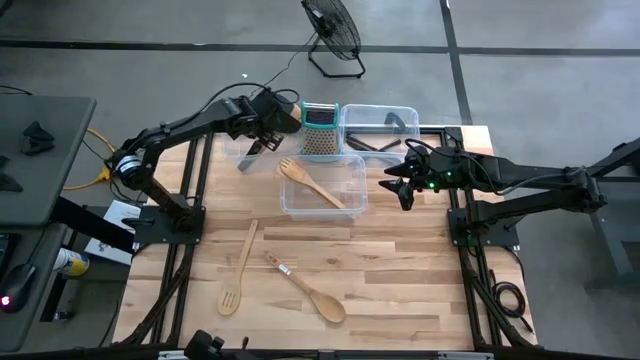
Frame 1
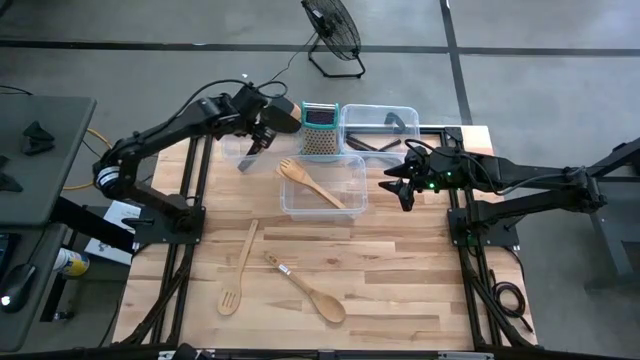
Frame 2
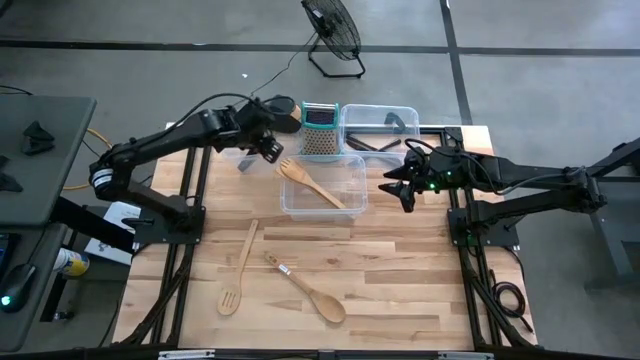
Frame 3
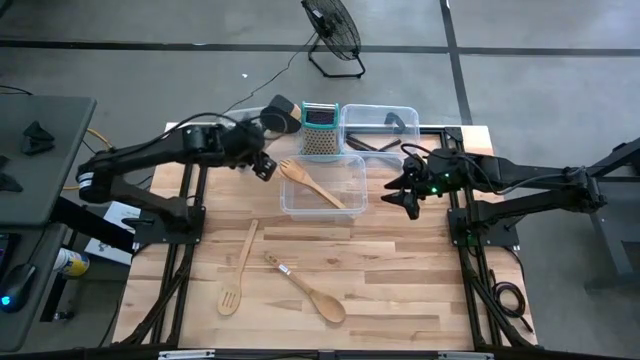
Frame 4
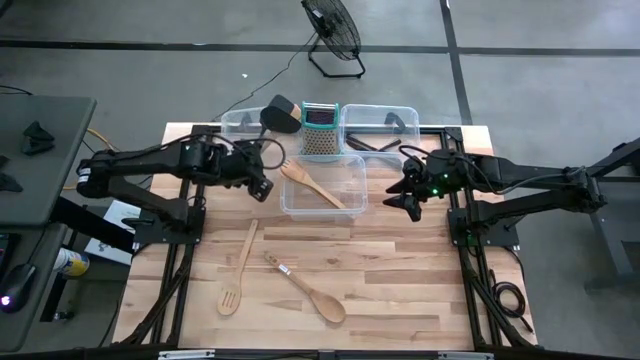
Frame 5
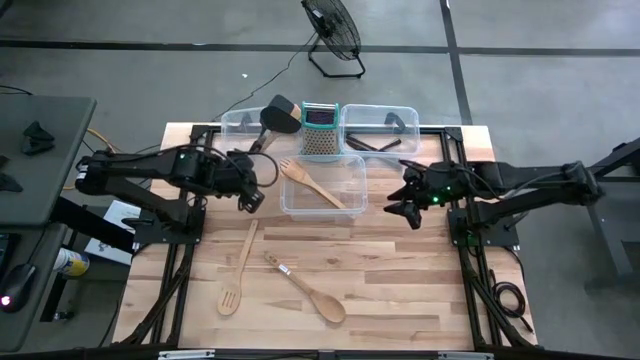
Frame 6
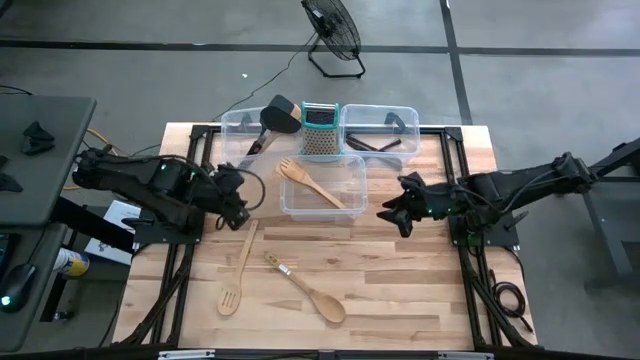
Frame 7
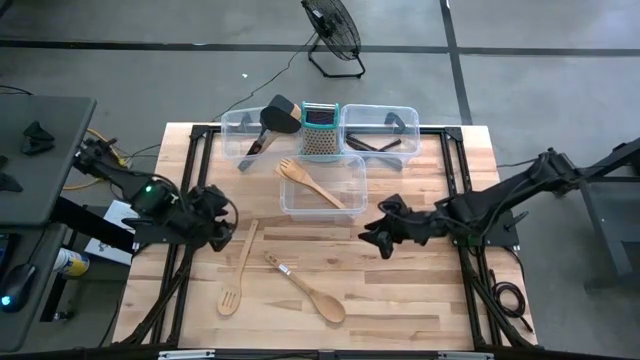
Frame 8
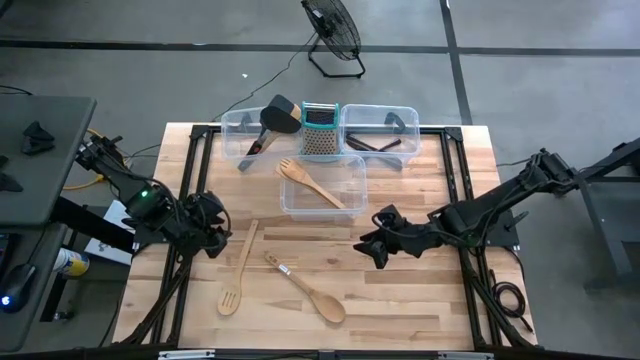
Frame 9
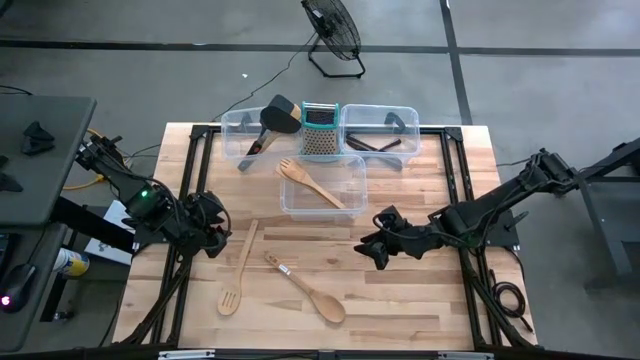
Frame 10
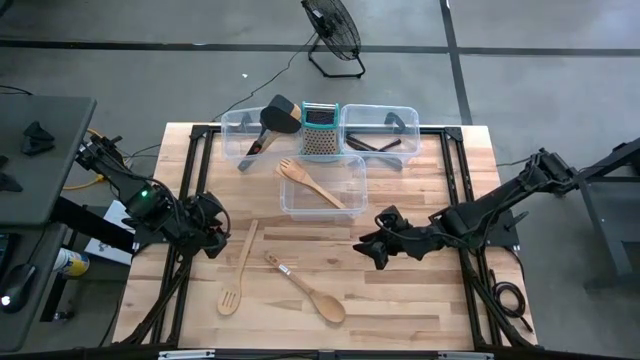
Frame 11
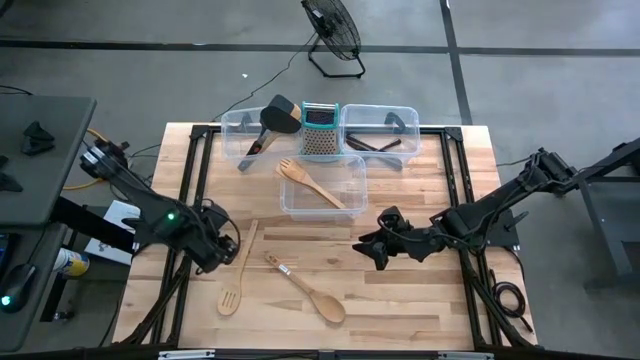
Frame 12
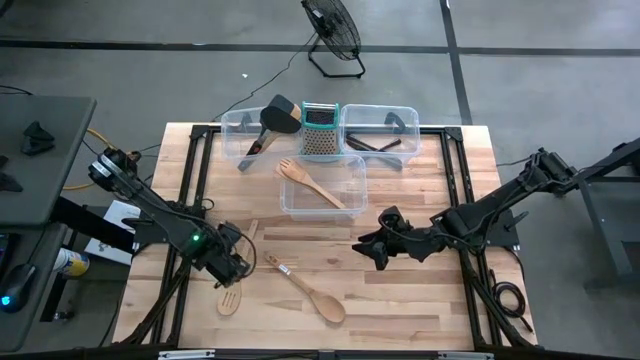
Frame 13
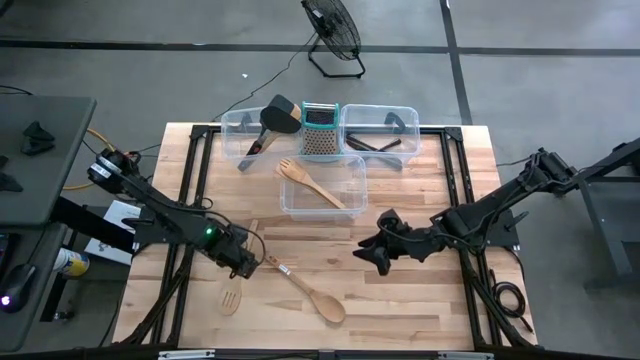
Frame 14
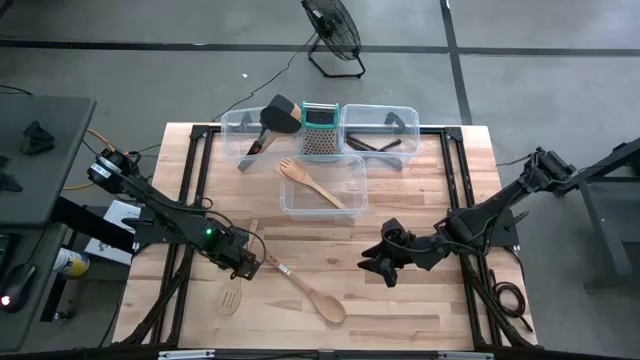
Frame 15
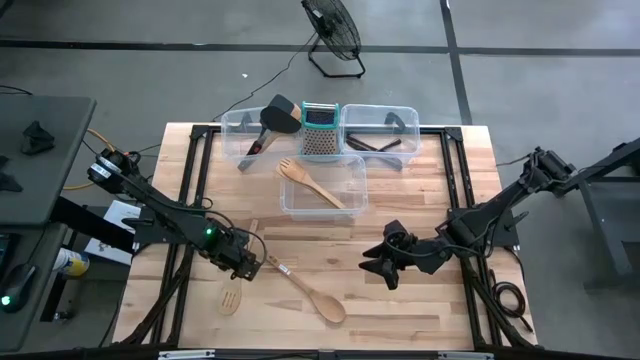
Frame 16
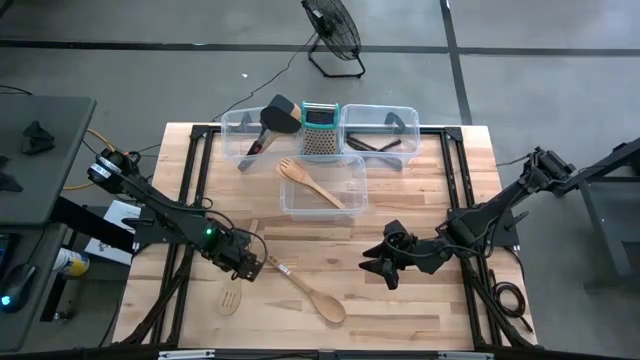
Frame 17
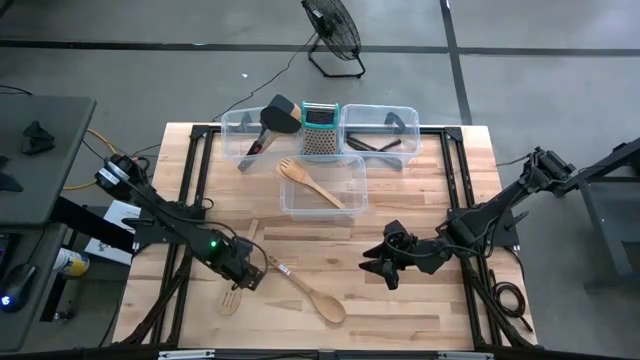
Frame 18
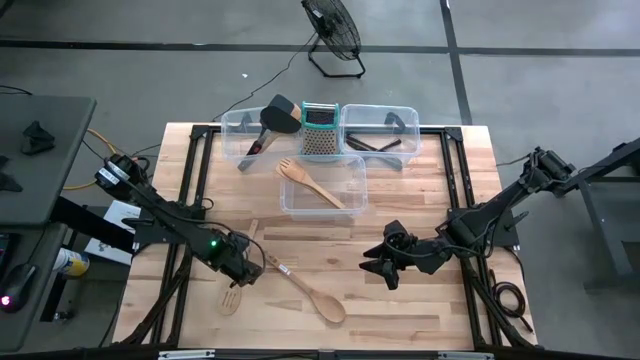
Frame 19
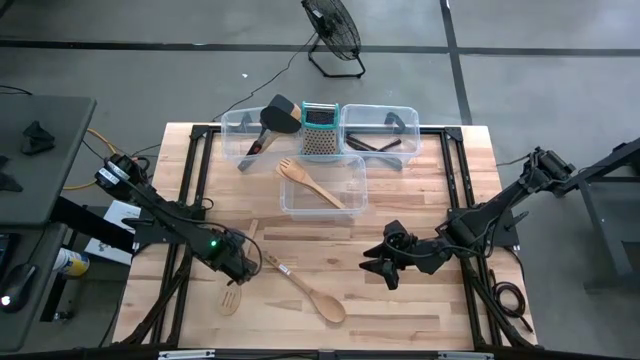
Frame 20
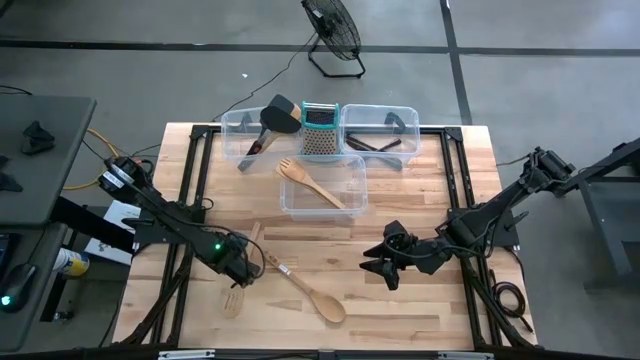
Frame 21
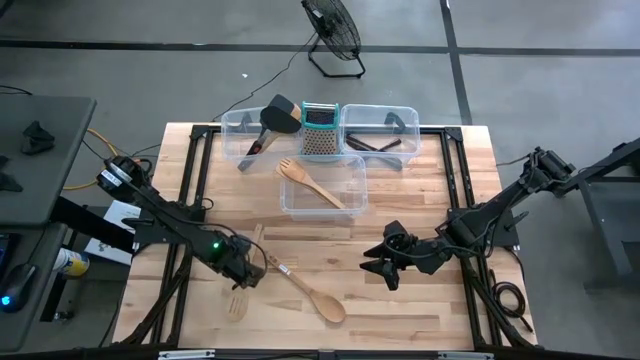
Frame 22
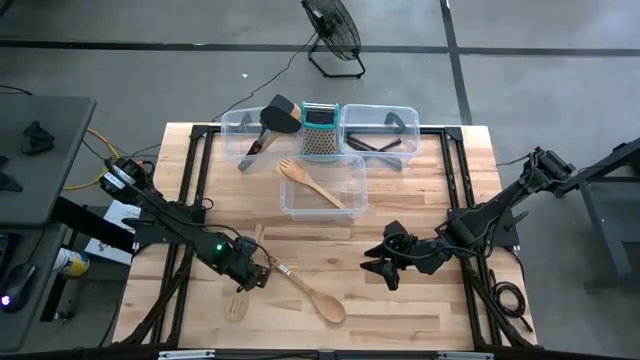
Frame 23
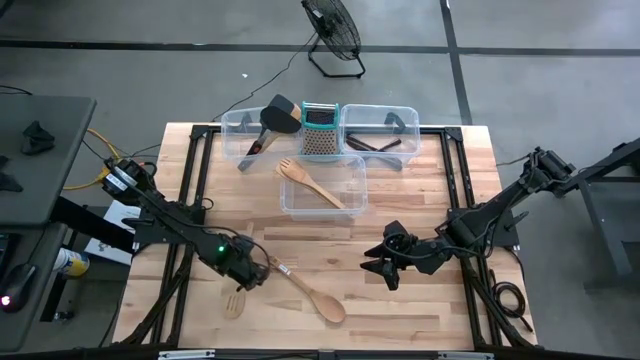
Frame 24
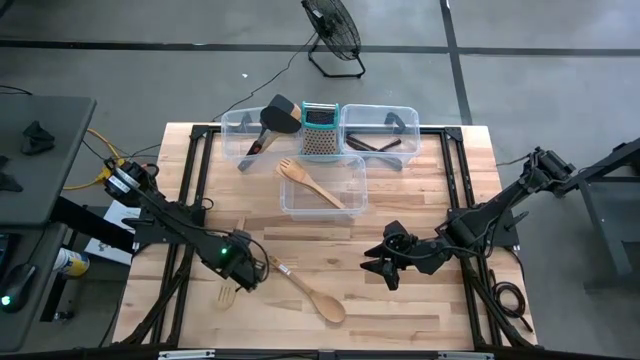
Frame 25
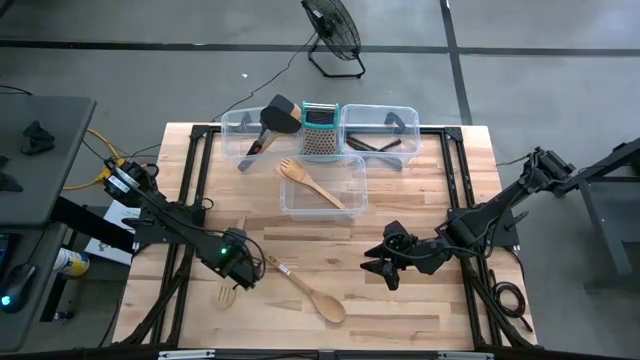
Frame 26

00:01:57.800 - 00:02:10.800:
Task: Pick & Place Kitchen Items
Put the light brown slotted spoon into the middle transparent bin

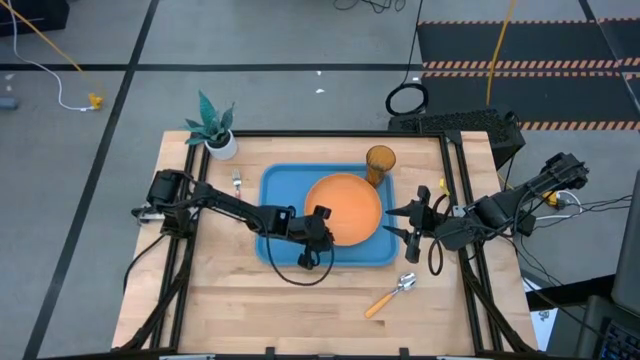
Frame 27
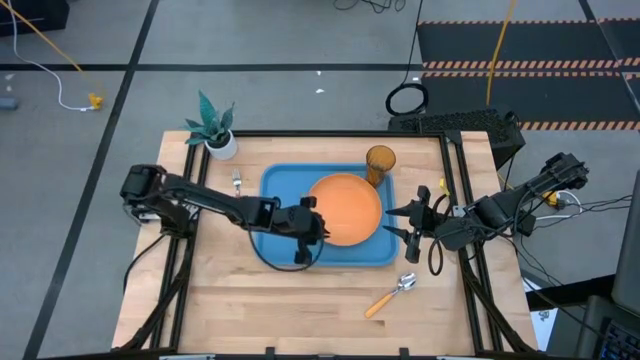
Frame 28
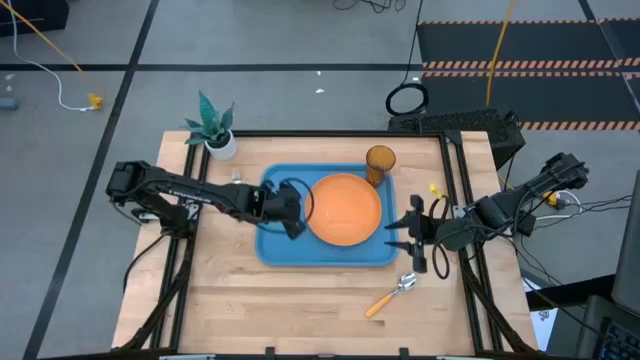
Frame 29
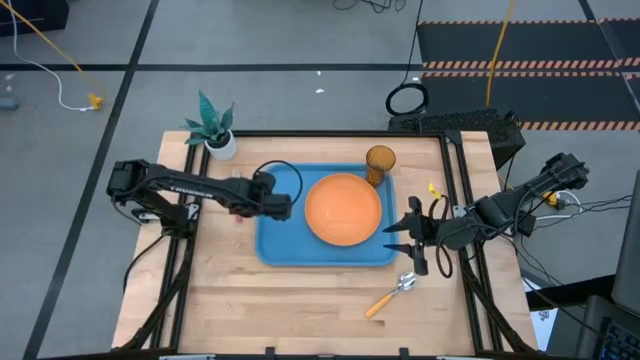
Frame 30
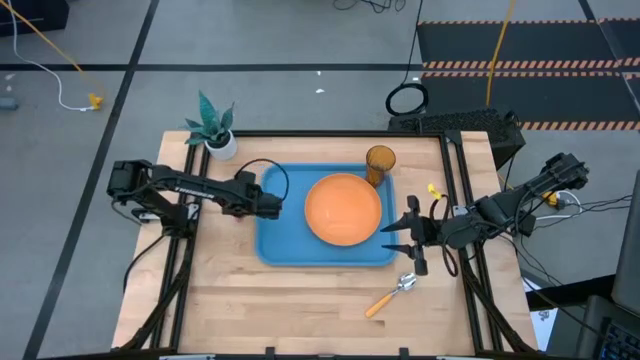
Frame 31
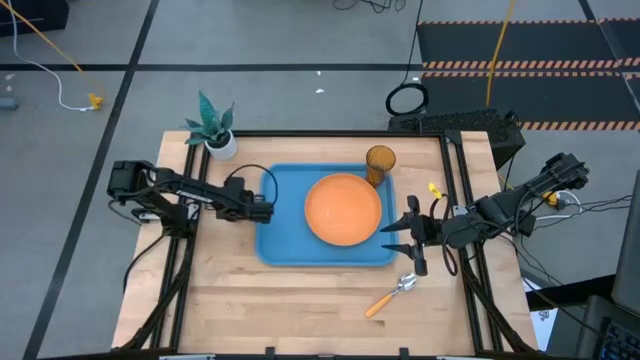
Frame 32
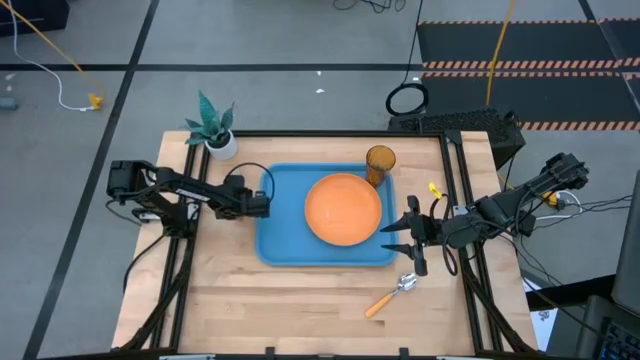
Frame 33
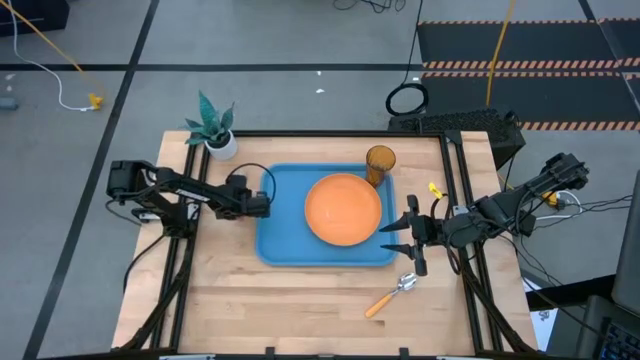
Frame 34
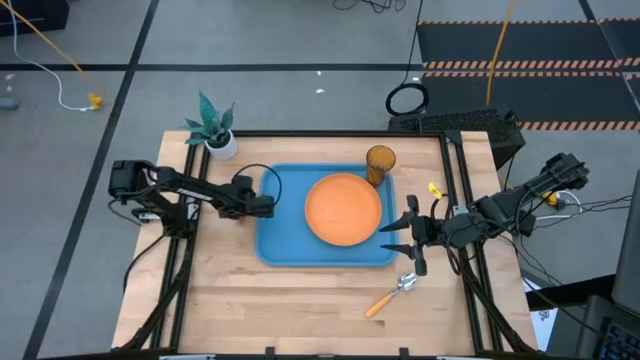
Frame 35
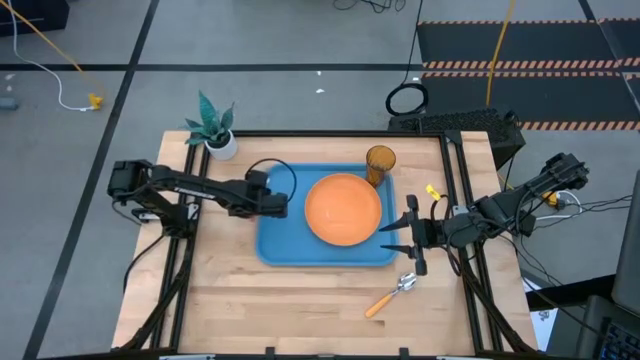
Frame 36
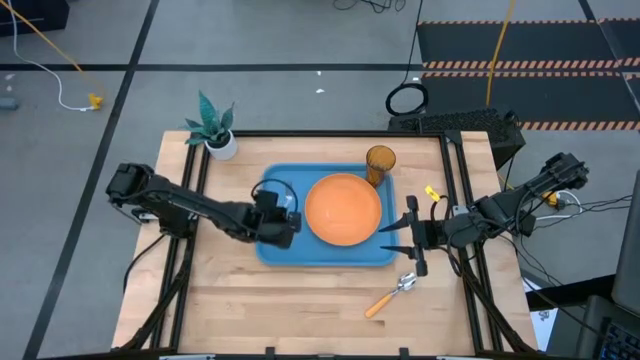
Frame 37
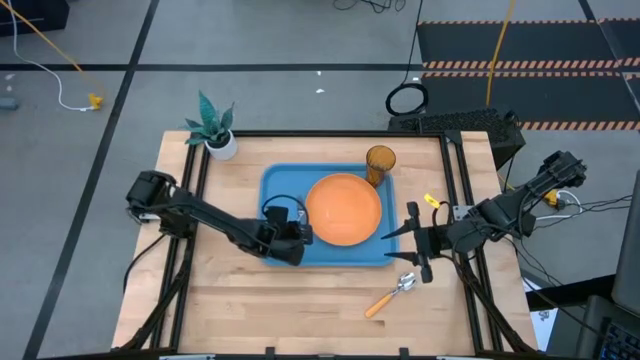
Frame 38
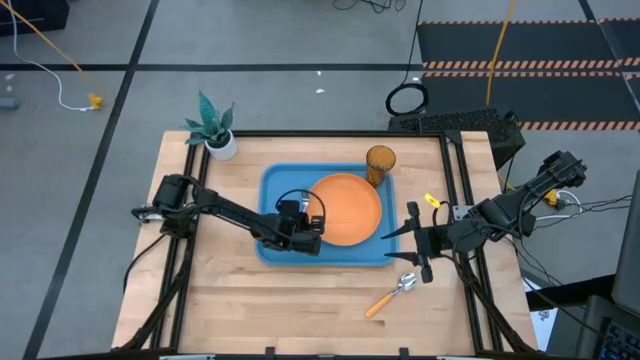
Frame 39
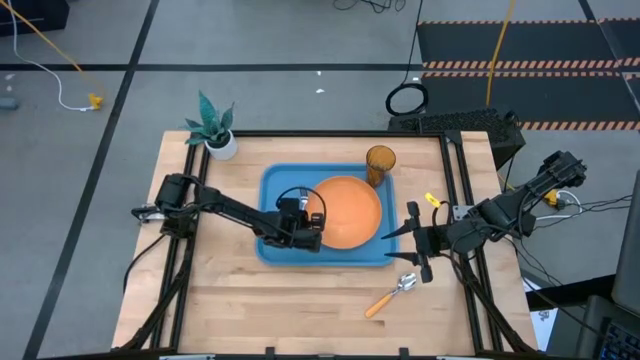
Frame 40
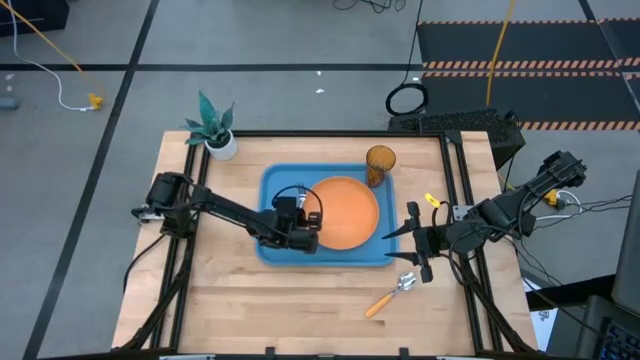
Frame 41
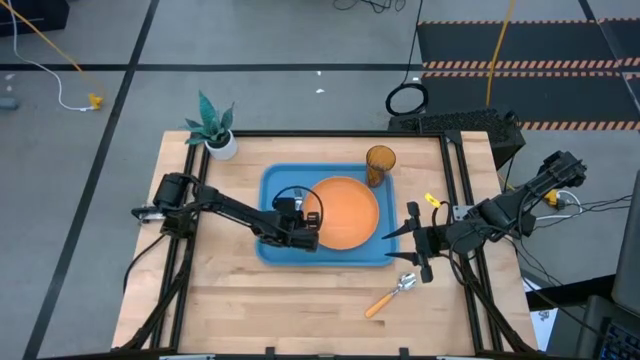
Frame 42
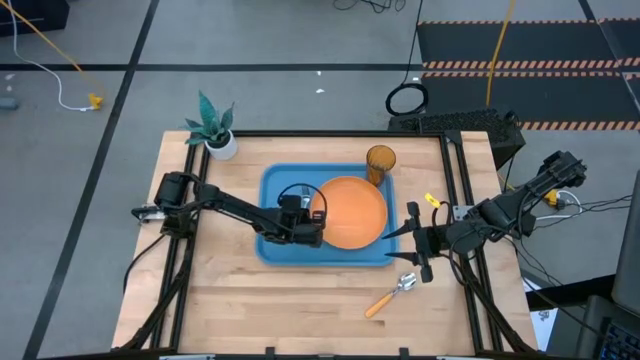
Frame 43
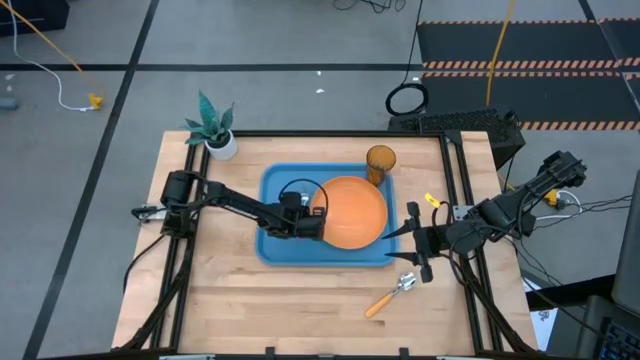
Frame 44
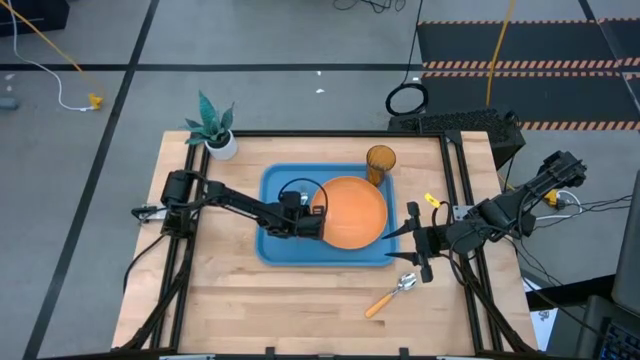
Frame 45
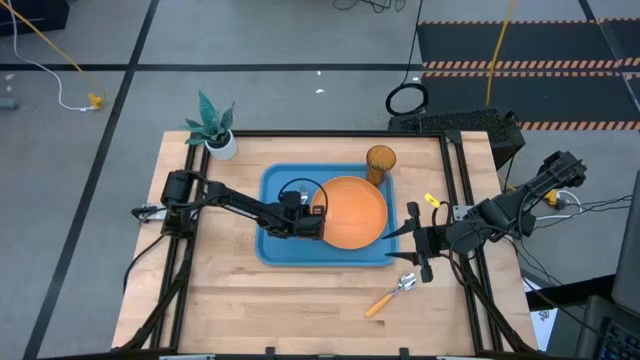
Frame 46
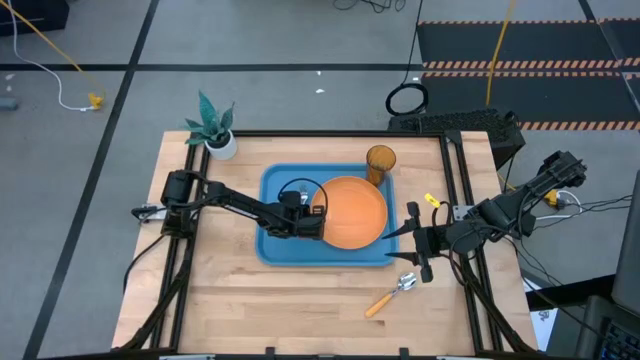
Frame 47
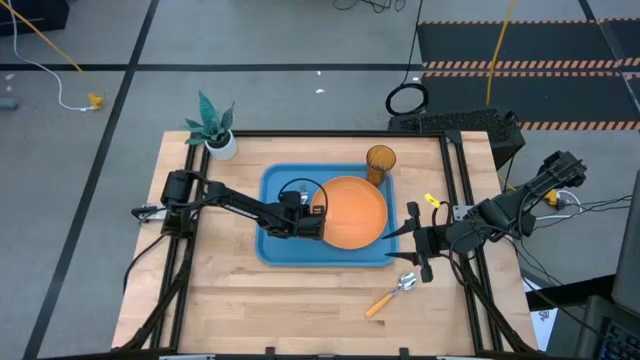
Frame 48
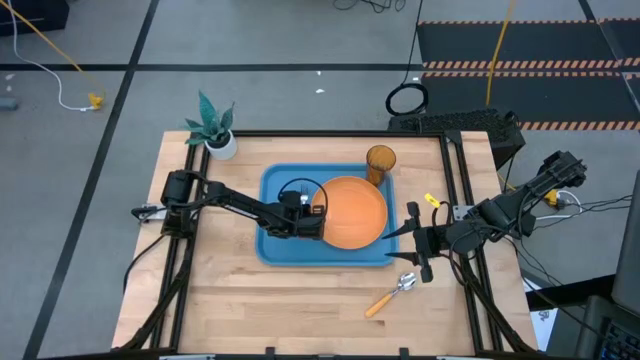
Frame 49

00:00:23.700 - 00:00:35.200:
Task: Pick and place plate/cup/fork/spoon on tray
Put the red fork on the blue tray to the left side of the yellow plate
